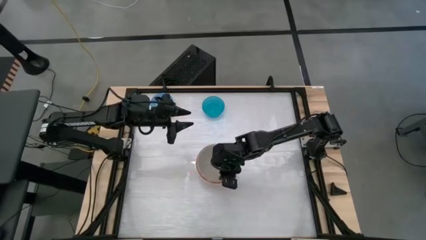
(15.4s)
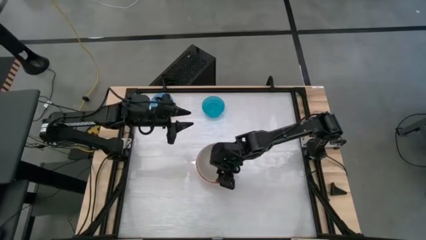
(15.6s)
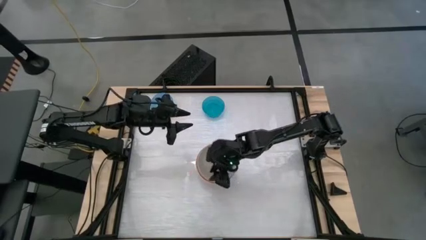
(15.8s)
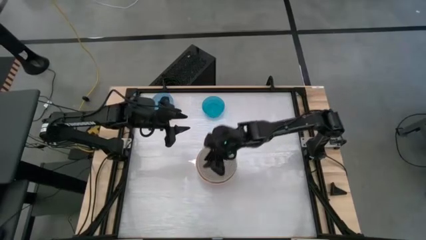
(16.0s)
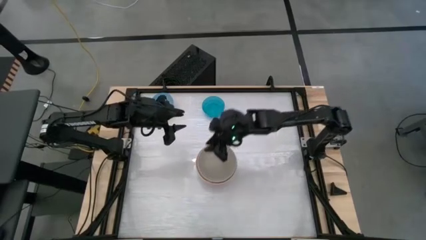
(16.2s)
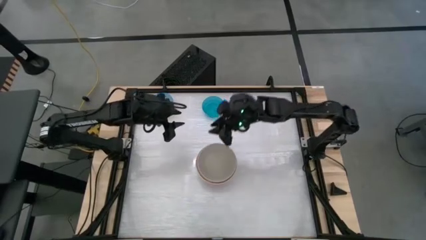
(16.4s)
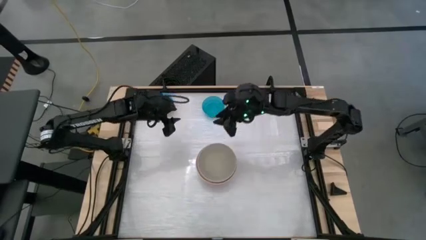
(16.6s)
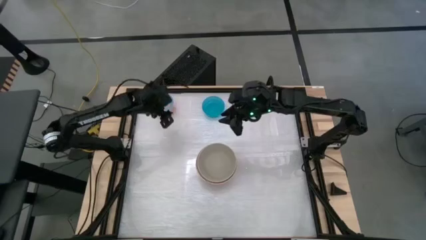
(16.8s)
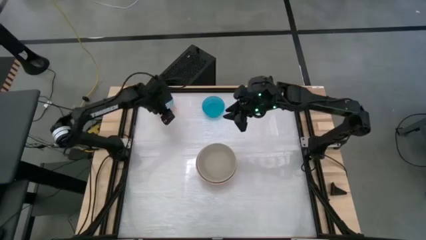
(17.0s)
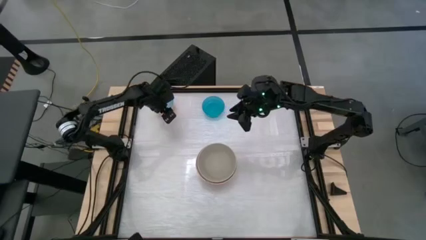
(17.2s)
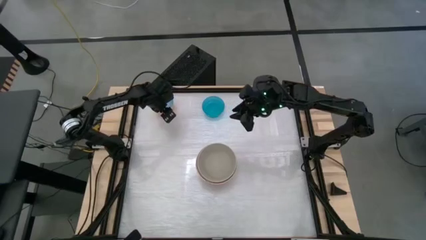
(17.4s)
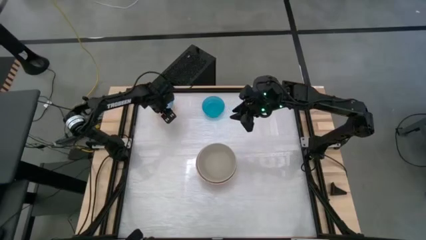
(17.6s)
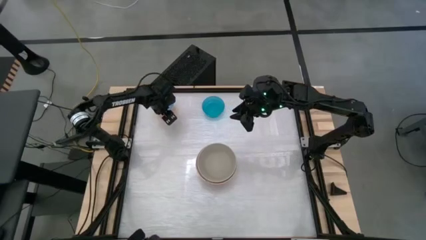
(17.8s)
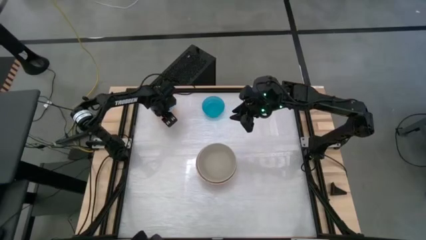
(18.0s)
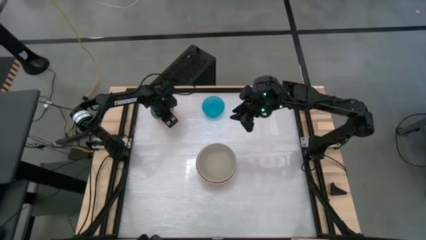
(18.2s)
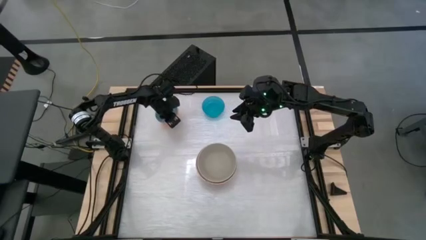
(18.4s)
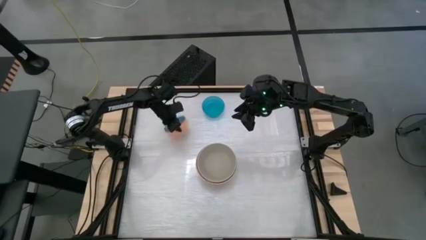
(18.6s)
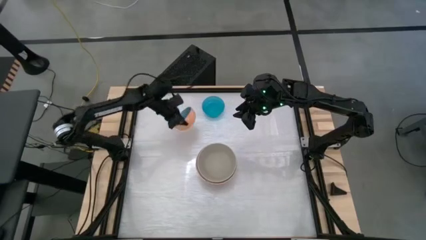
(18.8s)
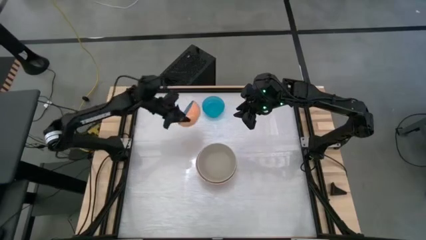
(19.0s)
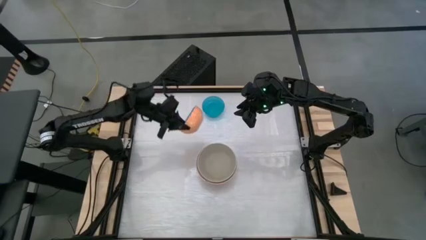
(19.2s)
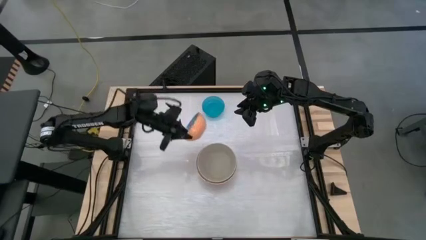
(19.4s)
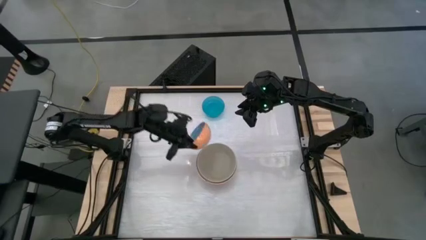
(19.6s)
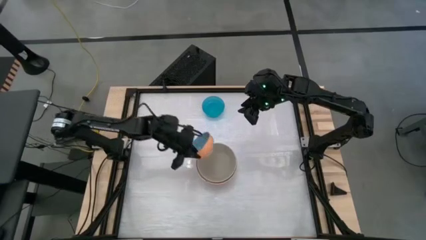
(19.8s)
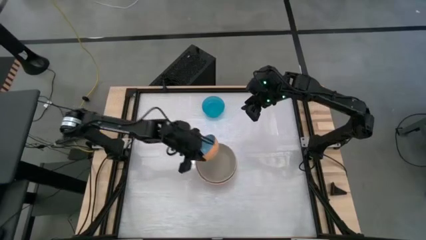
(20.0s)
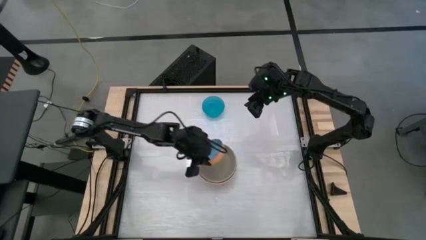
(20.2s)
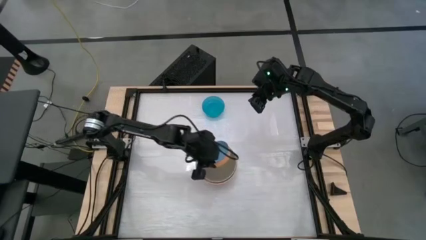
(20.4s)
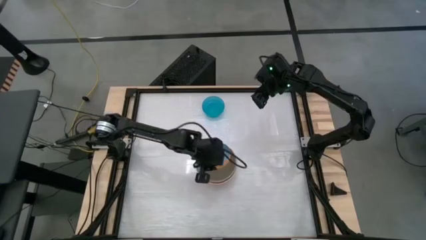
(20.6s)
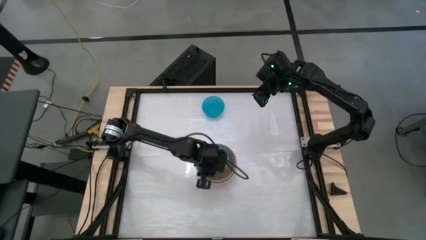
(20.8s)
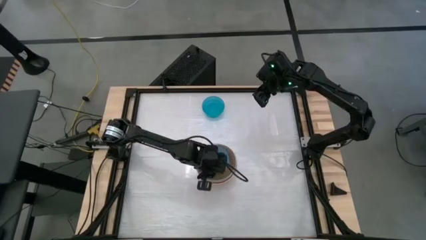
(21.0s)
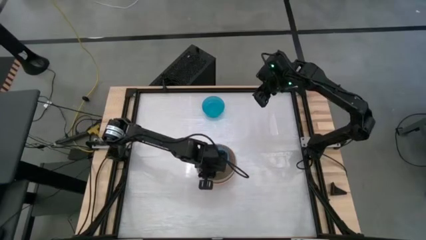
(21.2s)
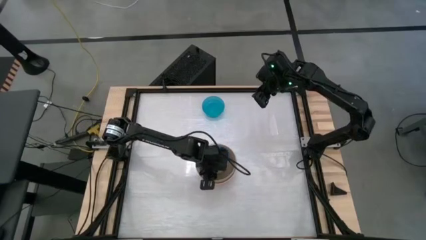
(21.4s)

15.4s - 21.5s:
Stack the blue patterned bowl on top of the gray bowl

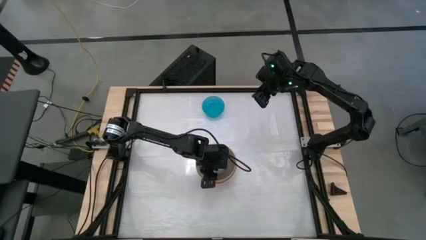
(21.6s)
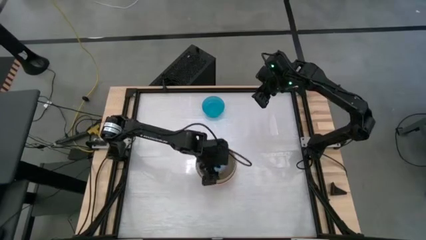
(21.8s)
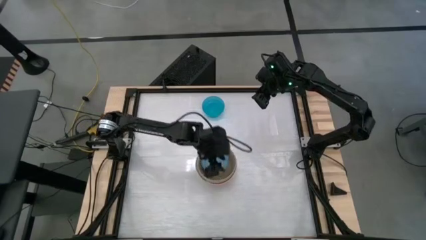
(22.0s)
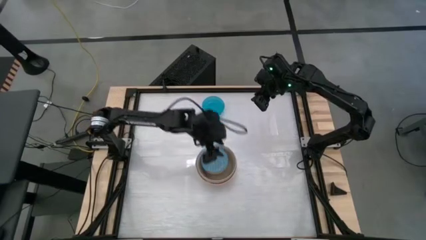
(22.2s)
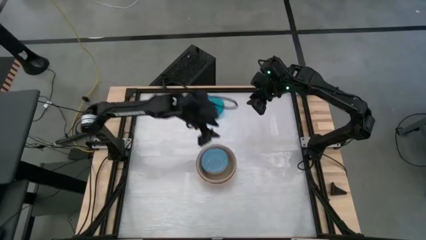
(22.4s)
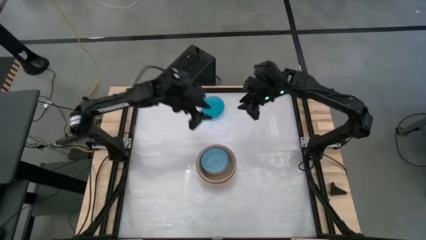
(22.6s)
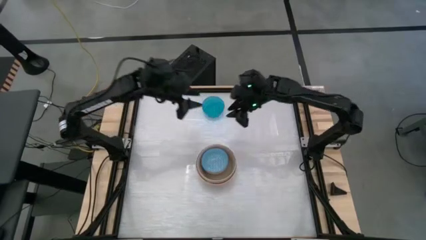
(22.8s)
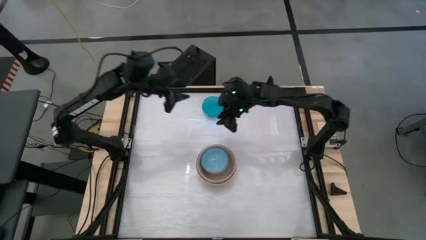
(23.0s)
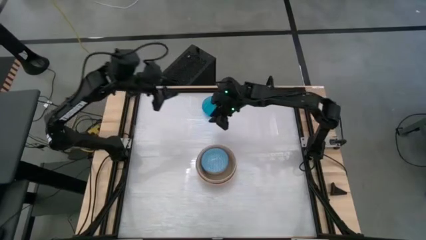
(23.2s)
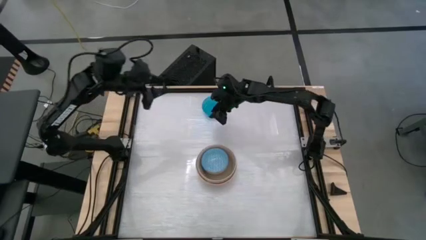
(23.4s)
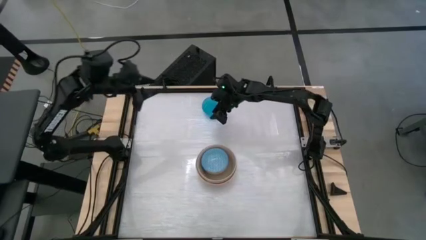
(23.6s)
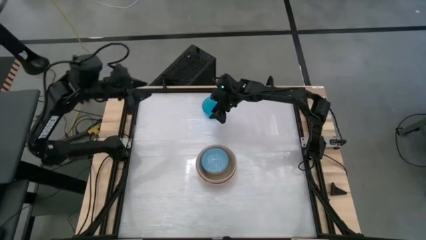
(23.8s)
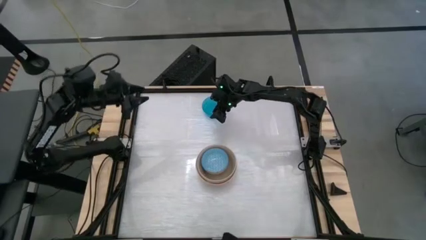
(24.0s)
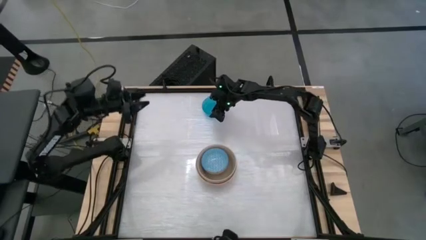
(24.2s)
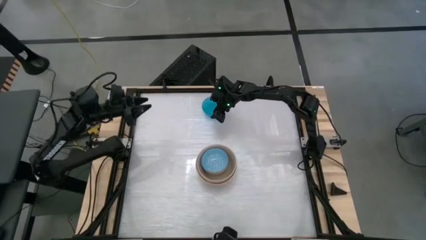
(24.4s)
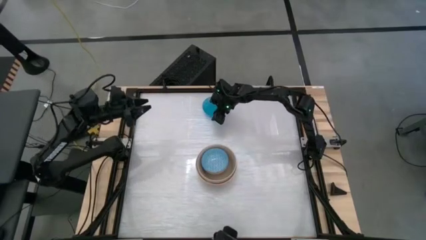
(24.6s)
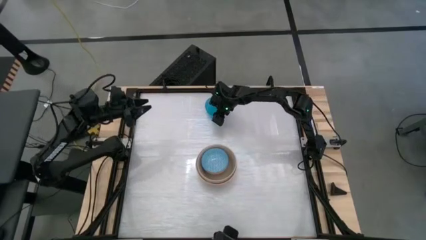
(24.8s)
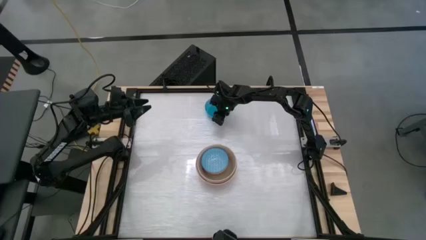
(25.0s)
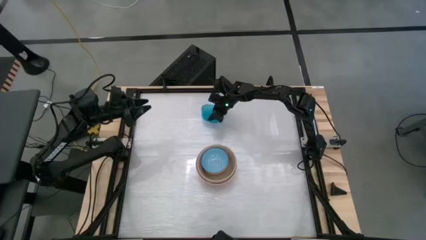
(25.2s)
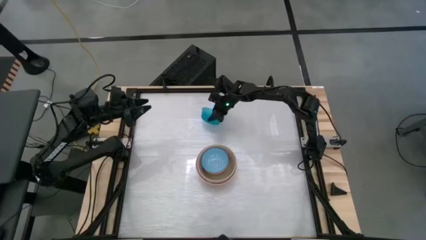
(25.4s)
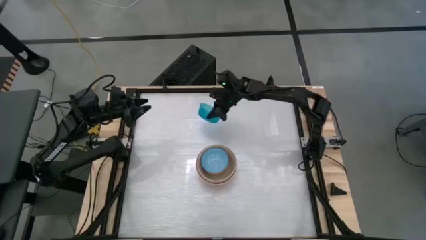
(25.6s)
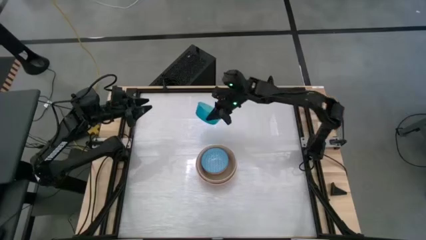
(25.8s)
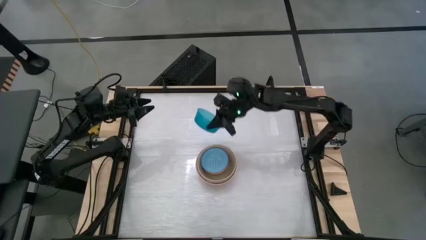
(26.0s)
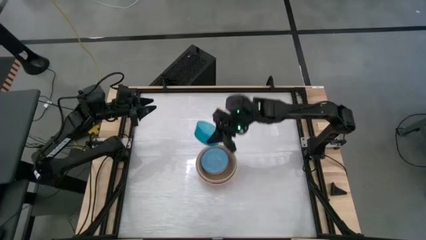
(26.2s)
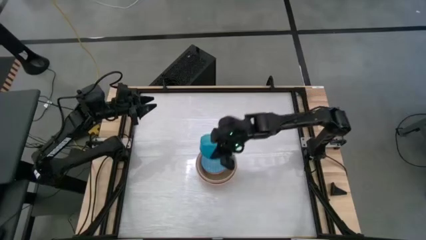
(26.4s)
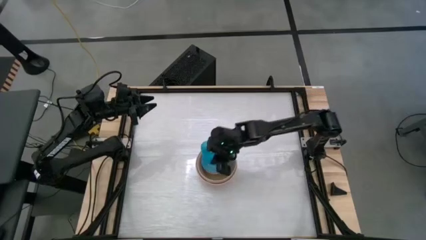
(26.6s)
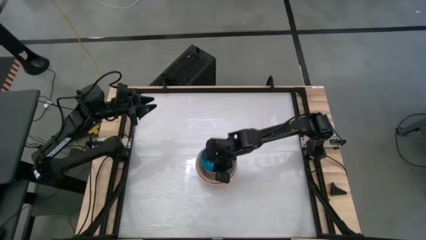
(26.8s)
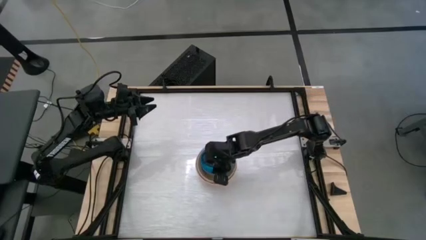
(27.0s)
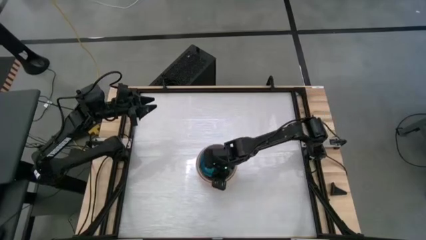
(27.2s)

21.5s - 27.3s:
Stack the blue transparent bowl on top of the blue patterned bowl

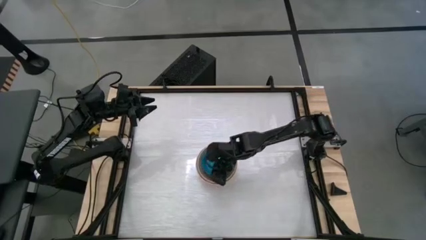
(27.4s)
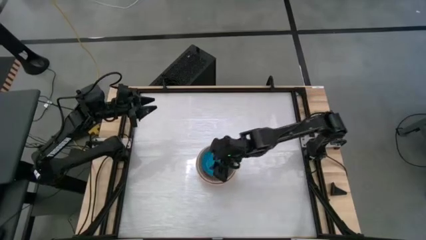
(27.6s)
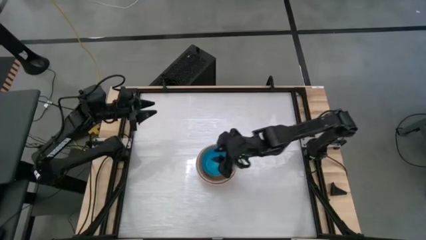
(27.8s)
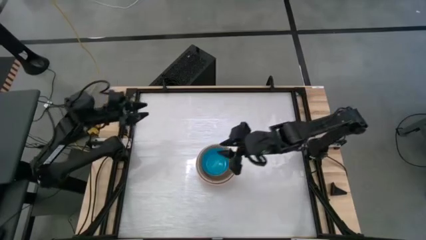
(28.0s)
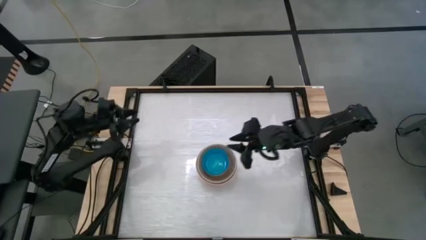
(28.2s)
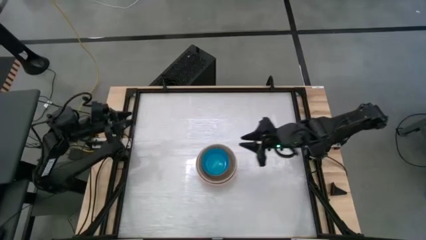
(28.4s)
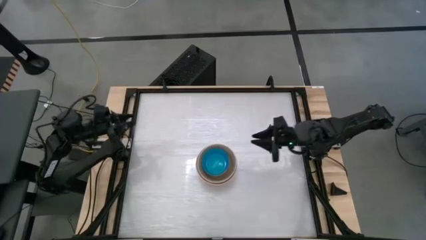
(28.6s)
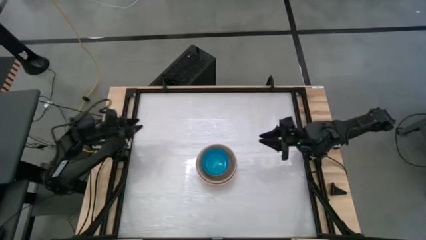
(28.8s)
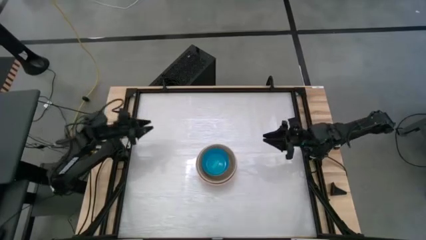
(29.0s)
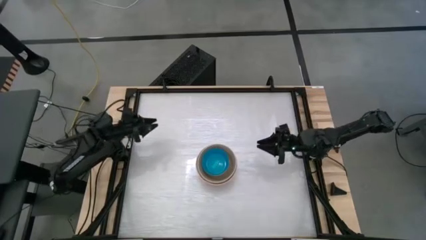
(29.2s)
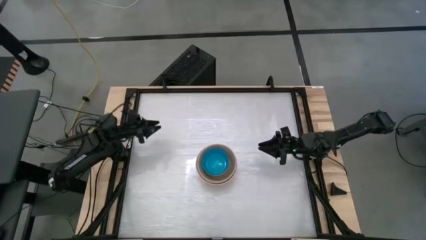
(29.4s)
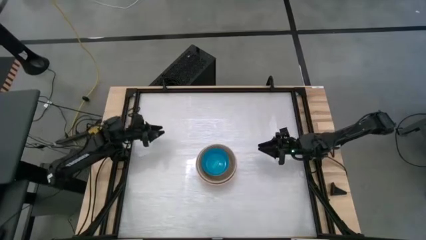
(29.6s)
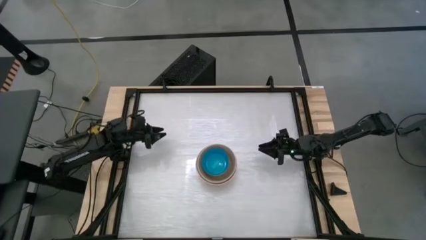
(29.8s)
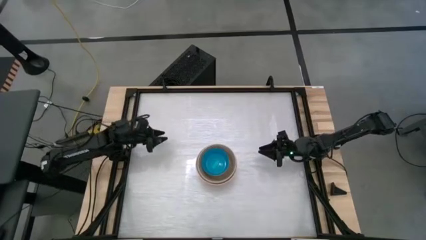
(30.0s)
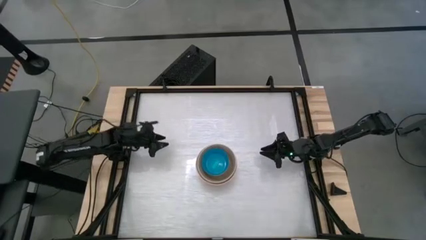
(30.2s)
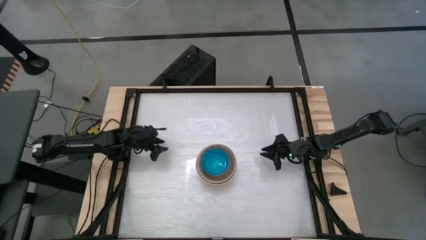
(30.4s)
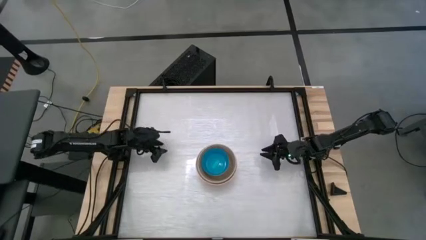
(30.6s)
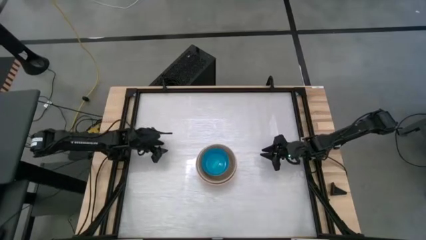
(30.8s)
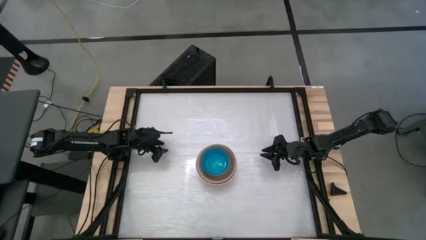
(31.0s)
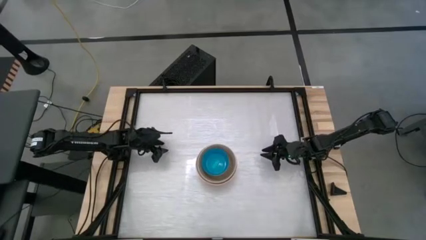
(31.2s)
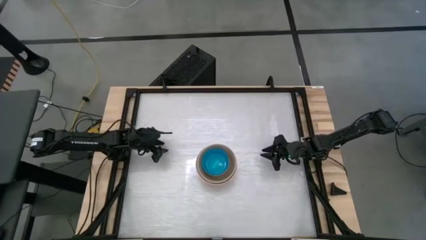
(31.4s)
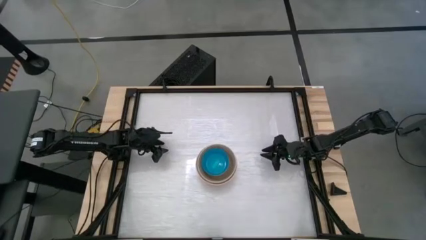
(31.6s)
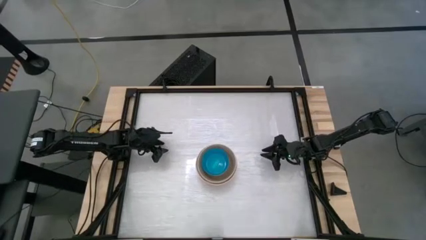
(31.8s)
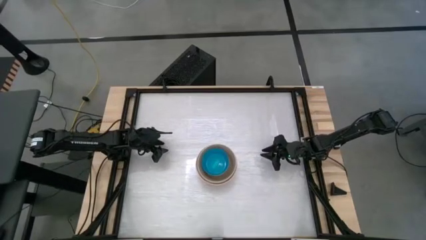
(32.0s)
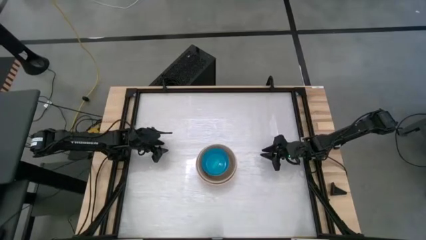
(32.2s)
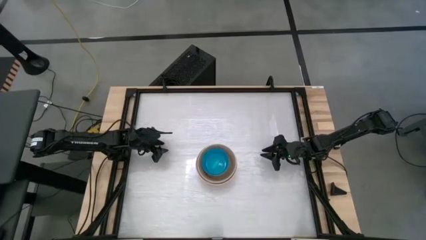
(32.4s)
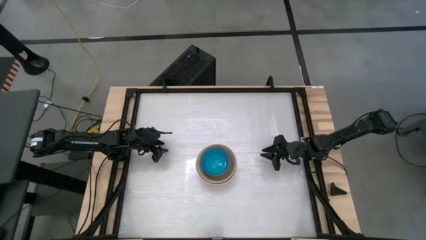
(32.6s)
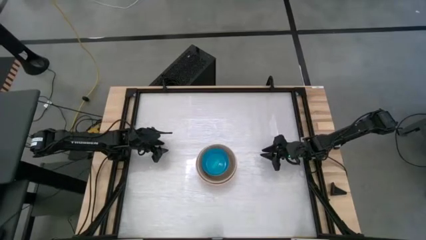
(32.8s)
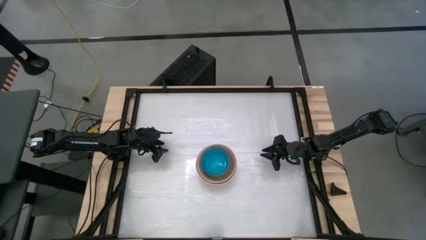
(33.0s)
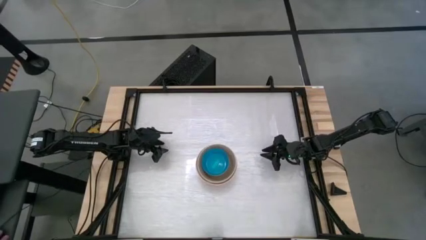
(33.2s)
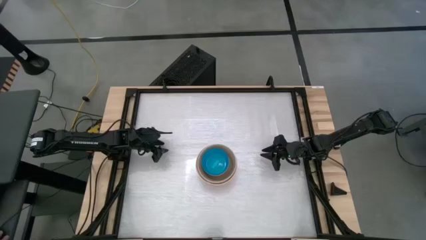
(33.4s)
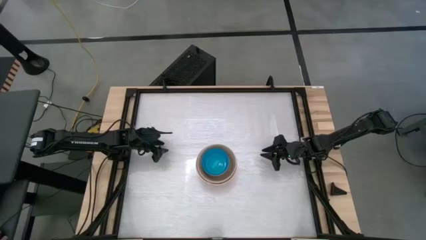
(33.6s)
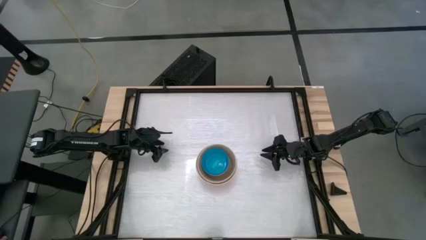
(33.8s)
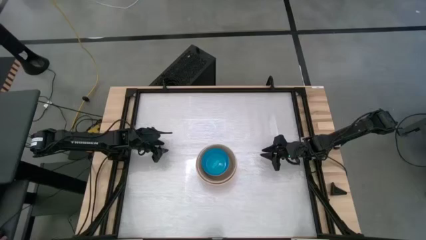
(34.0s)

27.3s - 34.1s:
Return to Home Position
